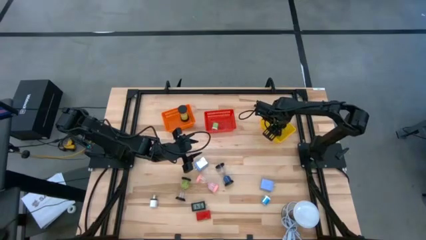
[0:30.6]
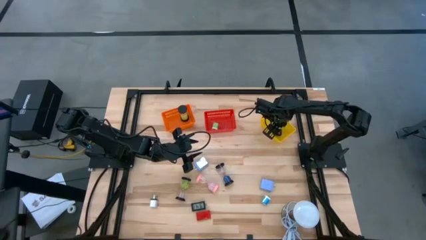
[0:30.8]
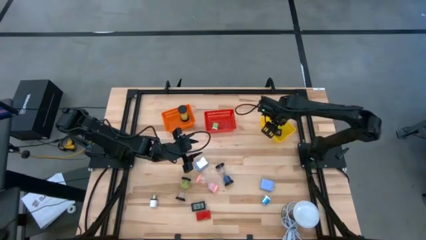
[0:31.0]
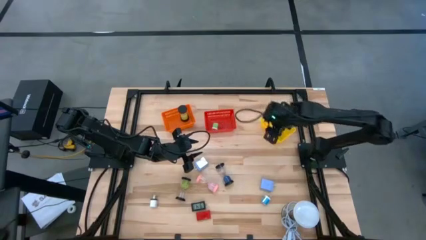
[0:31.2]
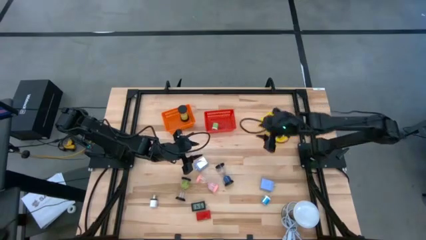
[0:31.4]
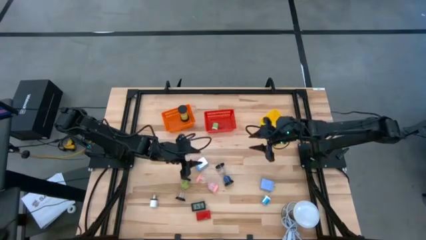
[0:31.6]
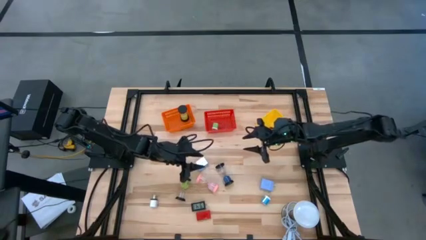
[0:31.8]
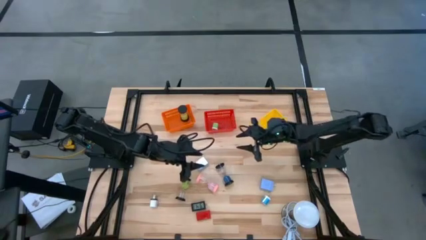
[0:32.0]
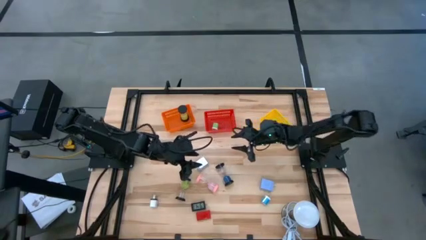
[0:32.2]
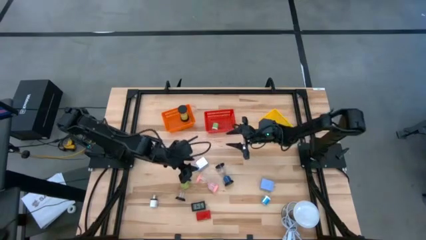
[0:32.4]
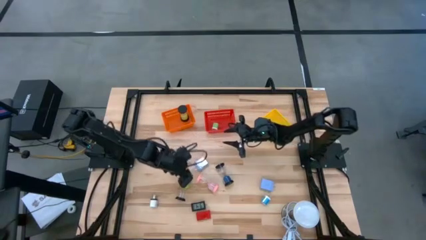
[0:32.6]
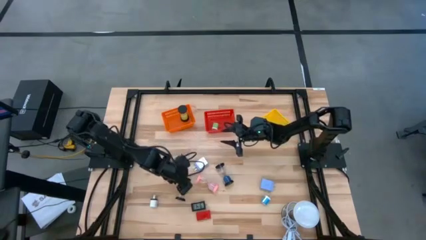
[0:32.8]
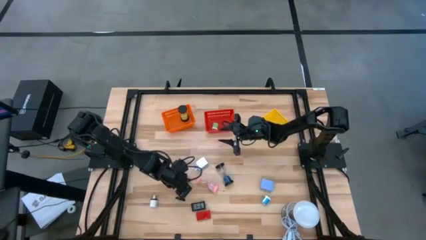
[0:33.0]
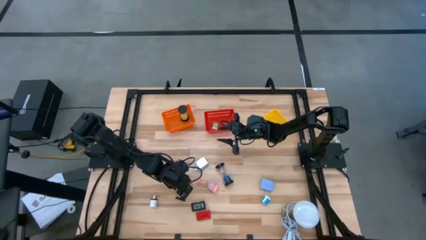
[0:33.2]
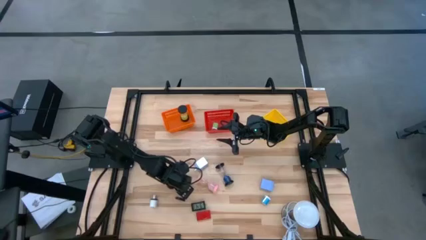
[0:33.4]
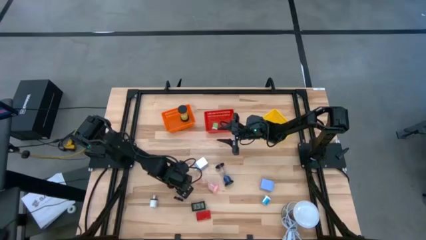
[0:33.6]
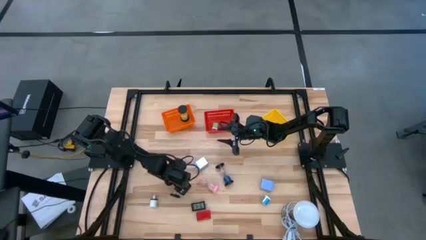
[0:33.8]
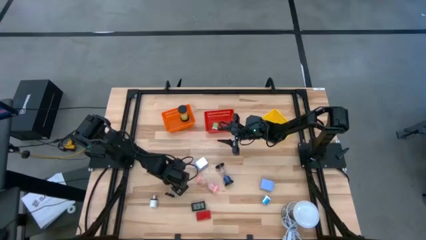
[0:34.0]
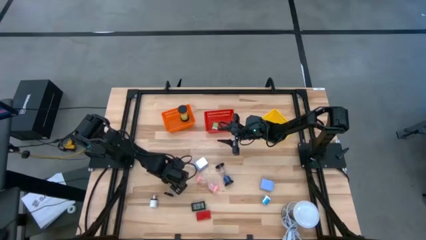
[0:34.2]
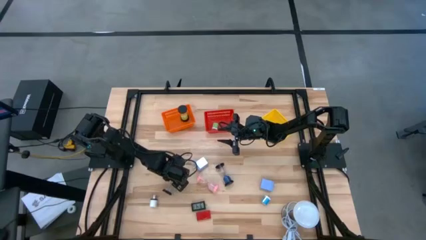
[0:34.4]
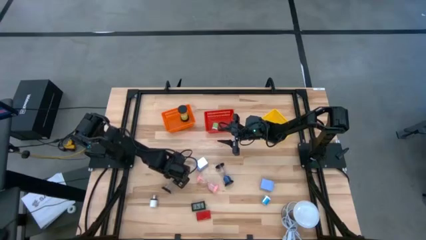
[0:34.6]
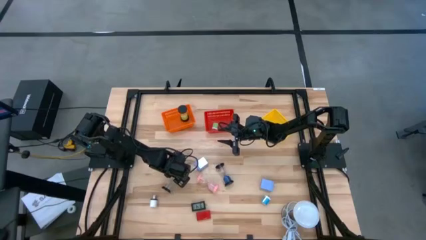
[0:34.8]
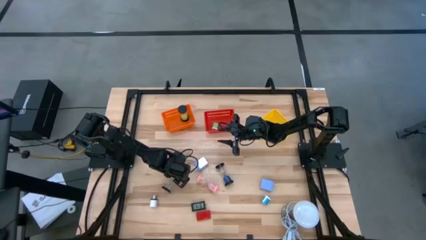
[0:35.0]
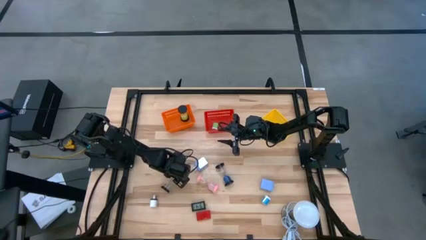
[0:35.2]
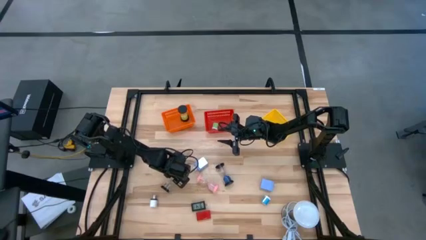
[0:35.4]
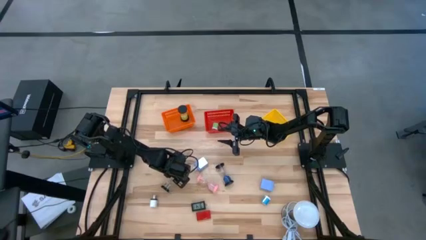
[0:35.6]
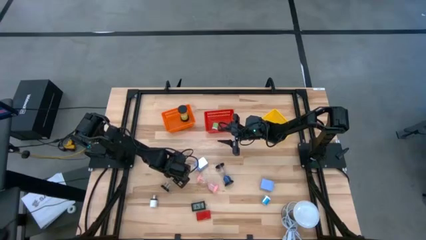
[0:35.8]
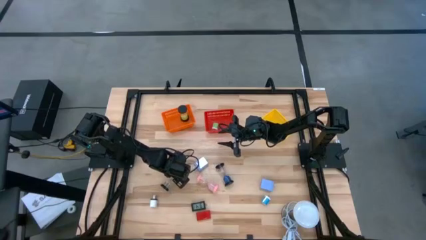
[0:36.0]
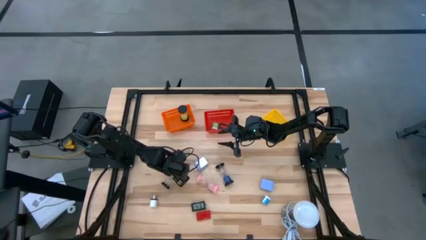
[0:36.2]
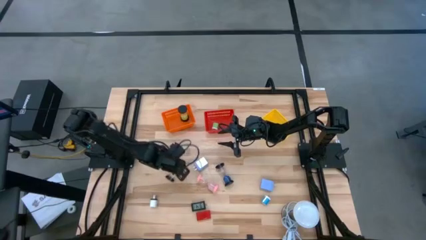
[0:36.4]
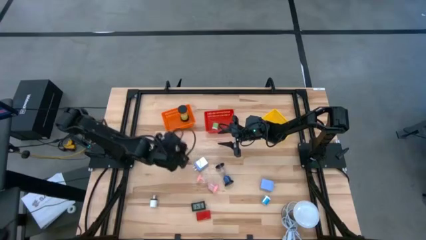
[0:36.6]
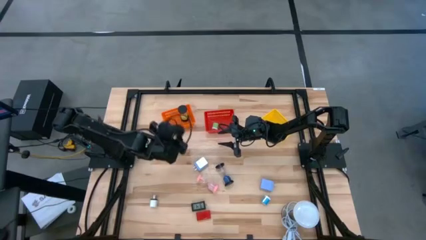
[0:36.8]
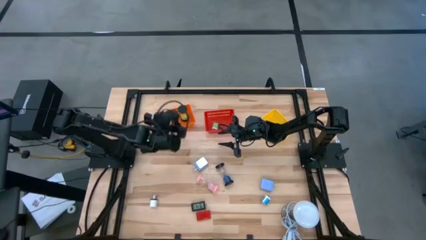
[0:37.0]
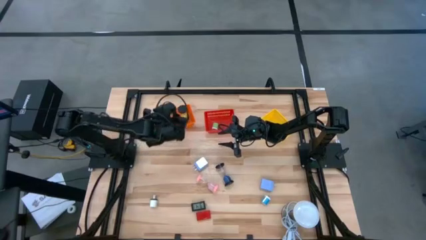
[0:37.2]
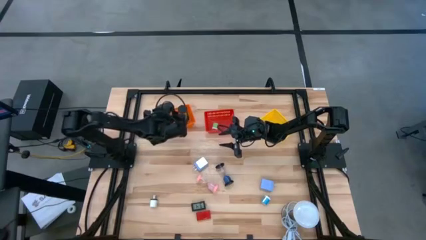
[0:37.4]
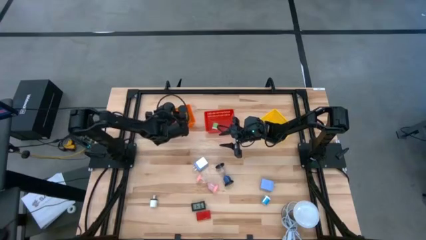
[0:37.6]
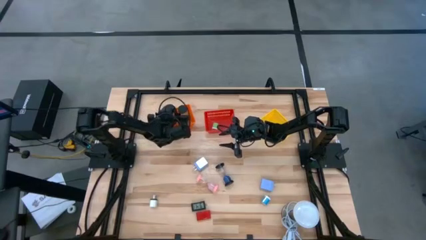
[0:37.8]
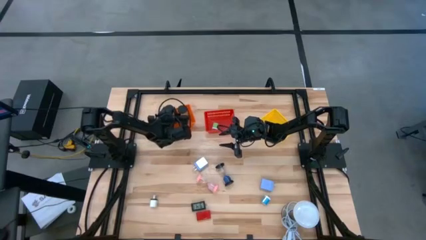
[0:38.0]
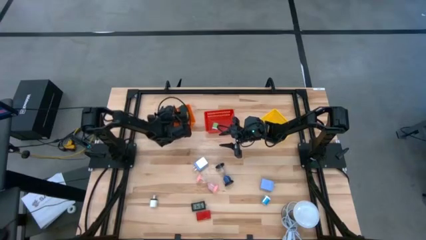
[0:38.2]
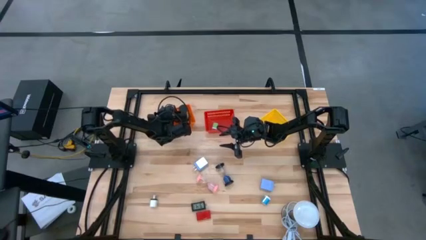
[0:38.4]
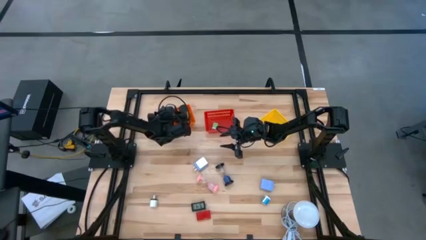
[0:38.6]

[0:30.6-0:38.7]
Task: Pick & Place Office items
Put the green hourglass into the orange bin

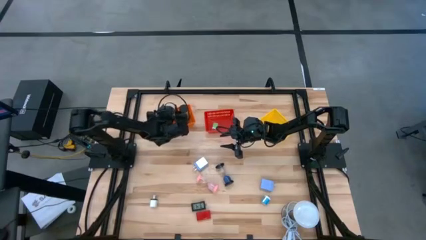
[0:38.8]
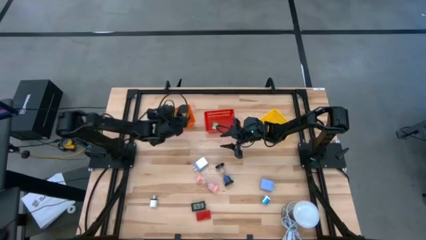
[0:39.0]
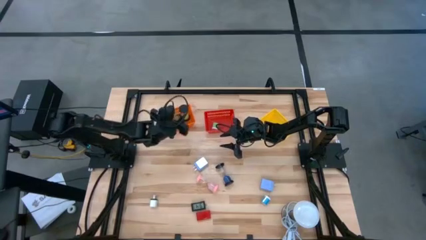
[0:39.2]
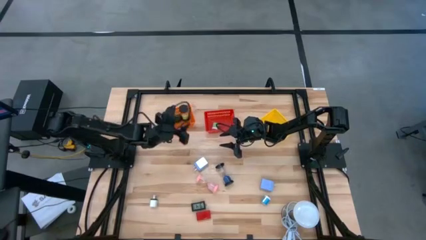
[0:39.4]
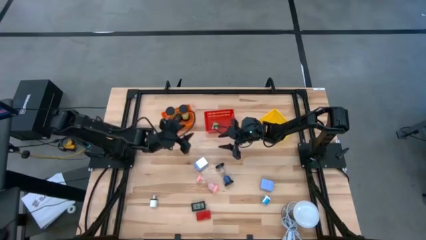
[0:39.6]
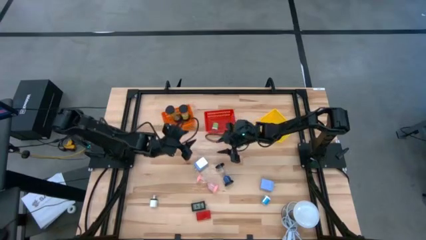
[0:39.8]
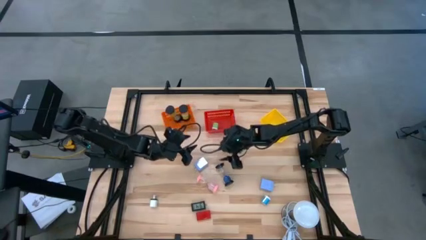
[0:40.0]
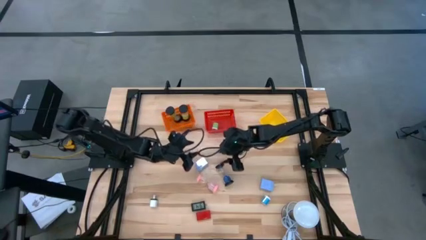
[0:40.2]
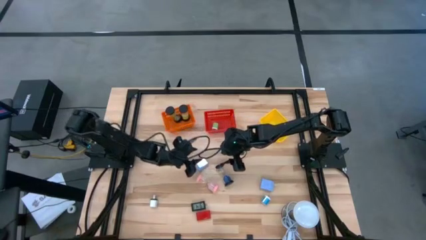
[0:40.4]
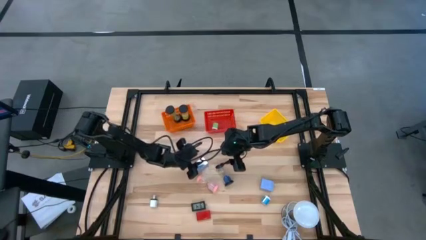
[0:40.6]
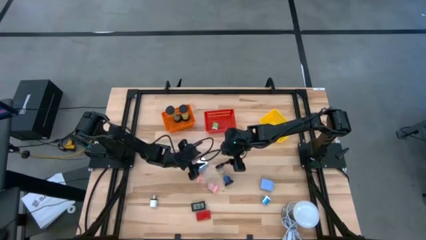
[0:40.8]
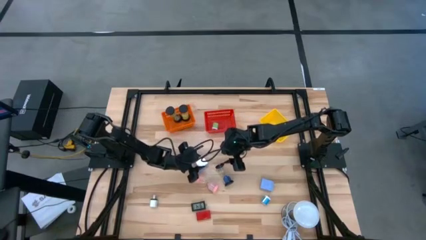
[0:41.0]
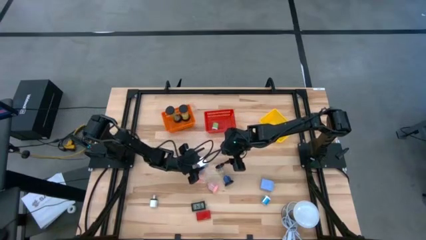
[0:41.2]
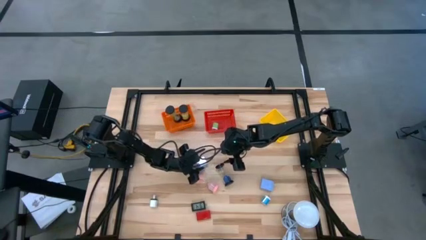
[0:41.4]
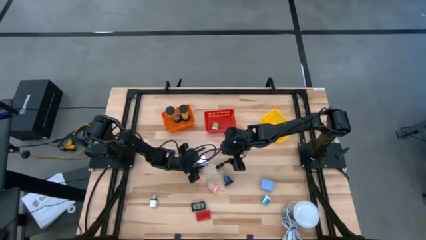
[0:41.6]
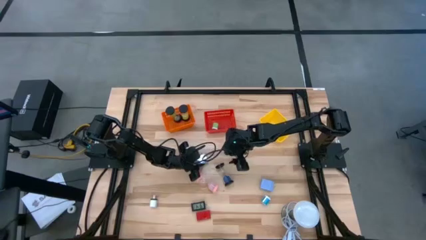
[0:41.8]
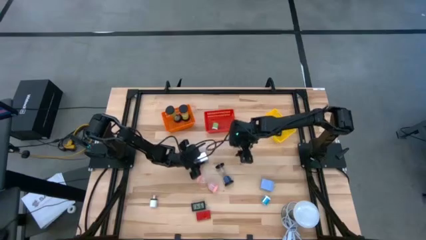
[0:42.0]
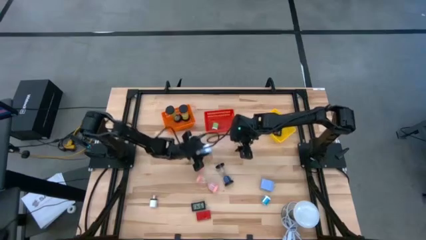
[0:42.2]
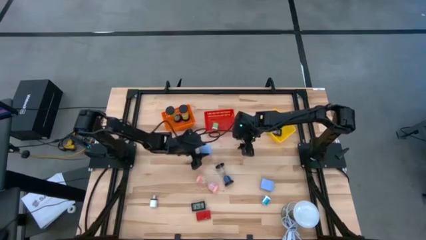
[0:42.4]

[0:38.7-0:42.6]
Put the left light violet charger adapter into the red bin

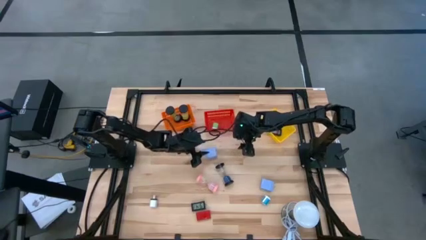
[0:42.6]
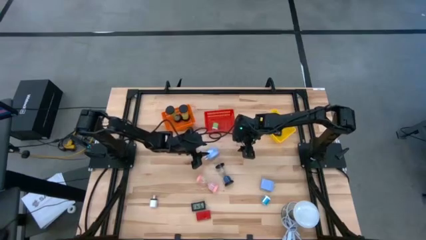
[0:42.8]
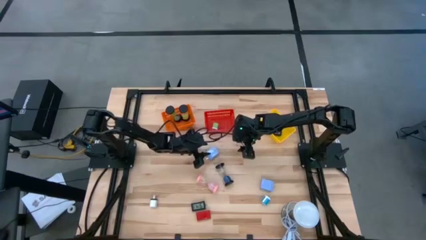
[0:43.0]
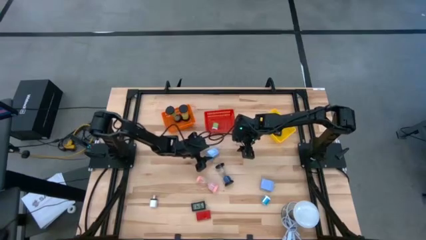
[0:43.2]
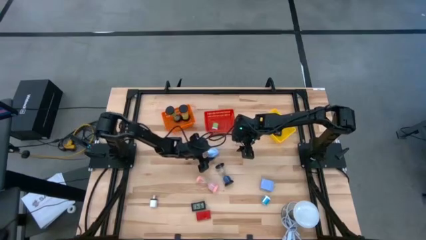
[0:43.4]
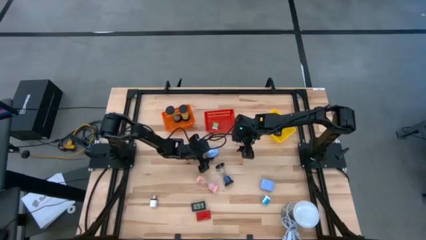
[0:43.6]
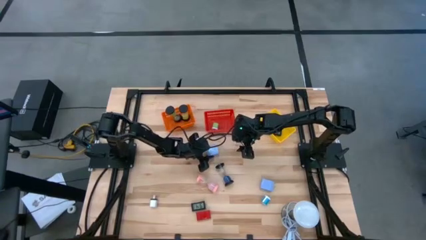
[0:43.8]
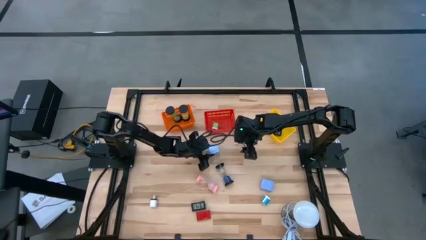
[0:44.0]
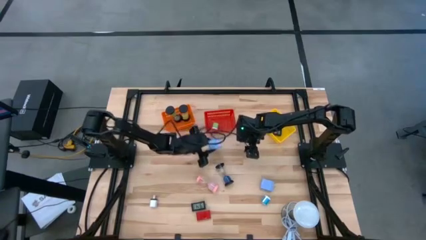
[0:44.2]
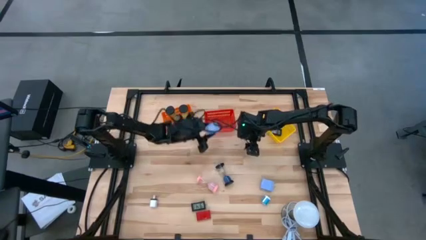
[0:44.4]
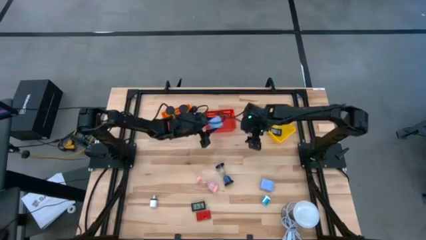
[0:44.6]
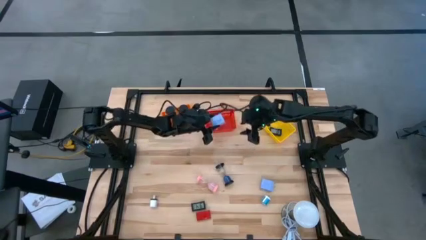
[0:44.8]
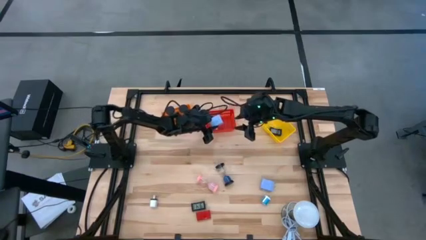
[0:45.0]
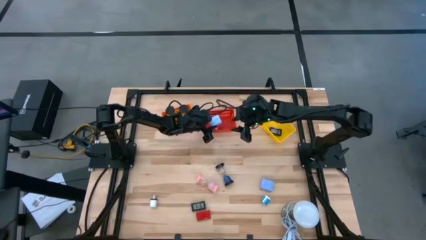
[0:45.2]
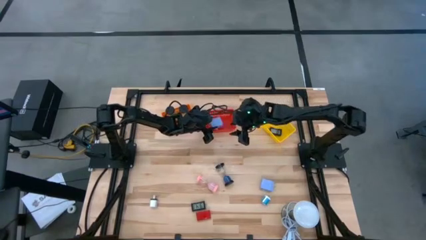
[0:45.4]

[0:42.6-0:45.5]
Put the left light violet charger adapter into the red bin

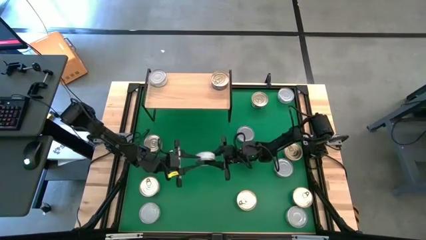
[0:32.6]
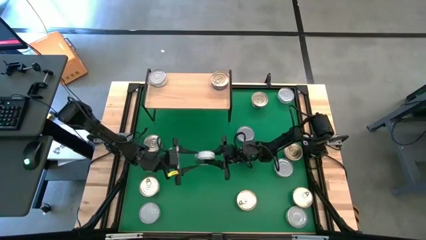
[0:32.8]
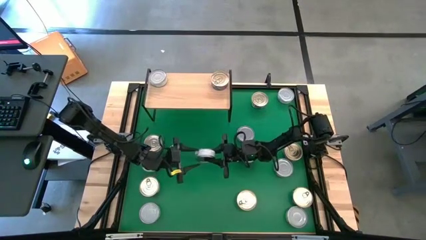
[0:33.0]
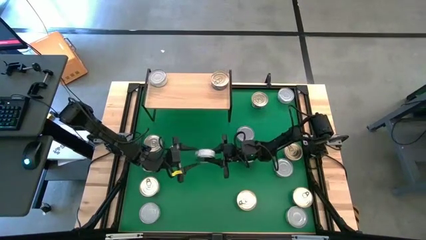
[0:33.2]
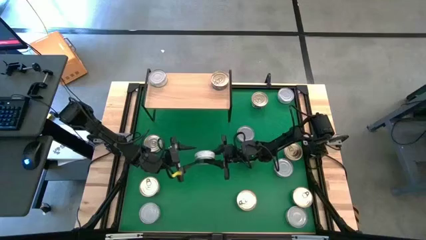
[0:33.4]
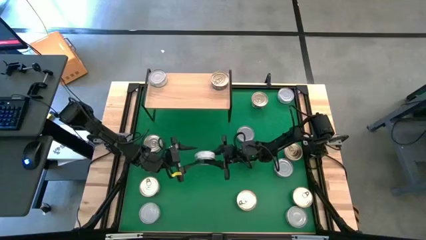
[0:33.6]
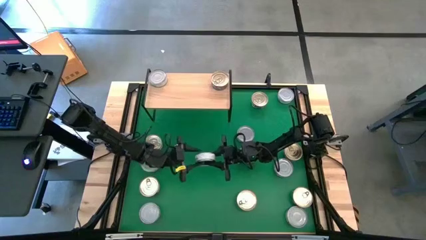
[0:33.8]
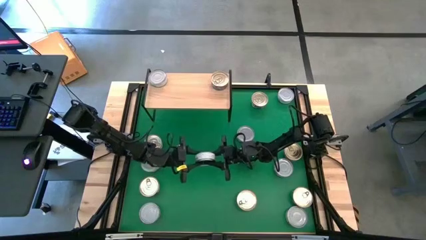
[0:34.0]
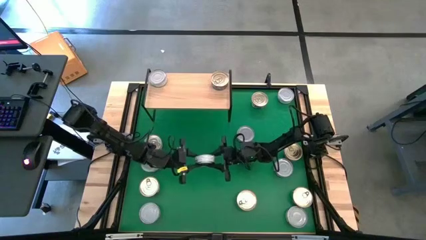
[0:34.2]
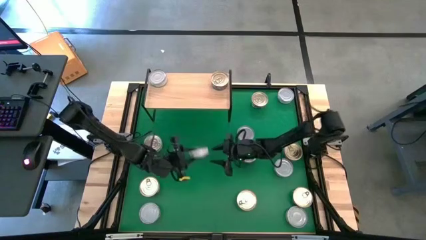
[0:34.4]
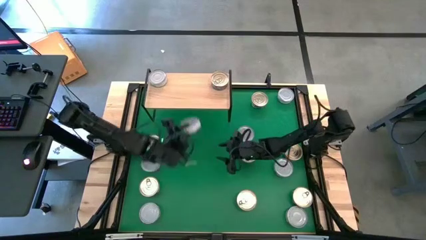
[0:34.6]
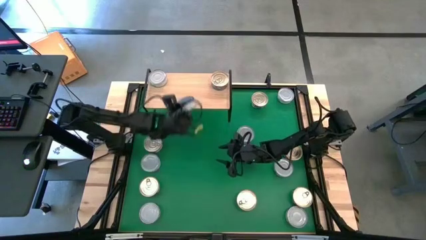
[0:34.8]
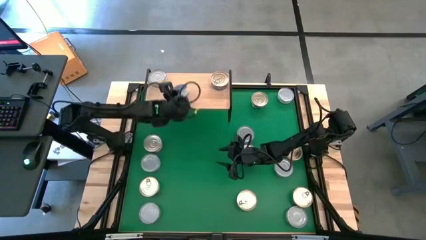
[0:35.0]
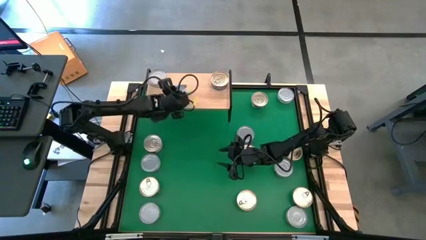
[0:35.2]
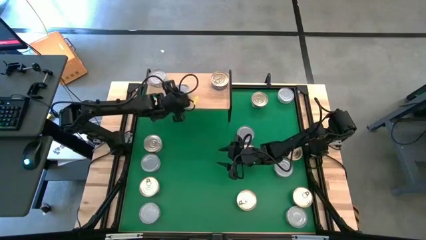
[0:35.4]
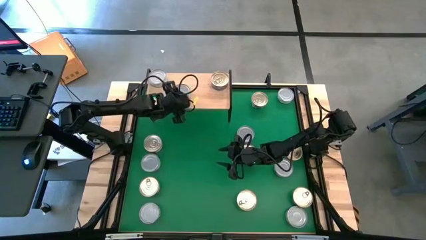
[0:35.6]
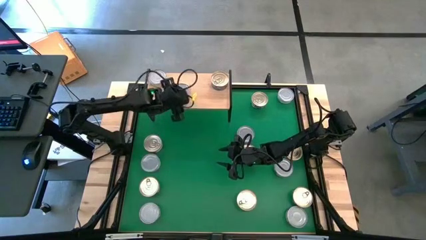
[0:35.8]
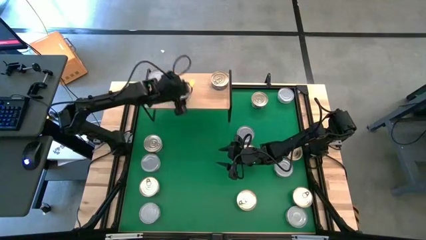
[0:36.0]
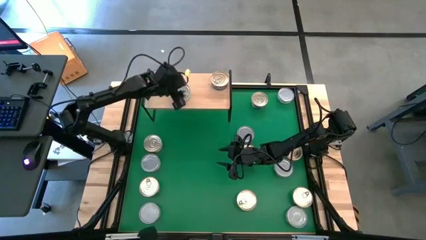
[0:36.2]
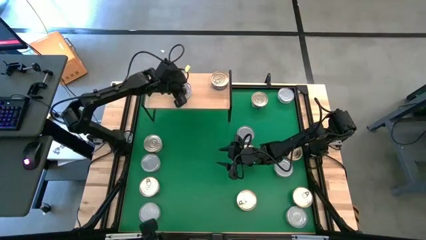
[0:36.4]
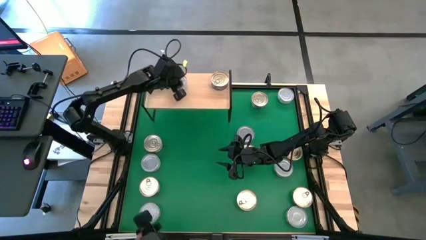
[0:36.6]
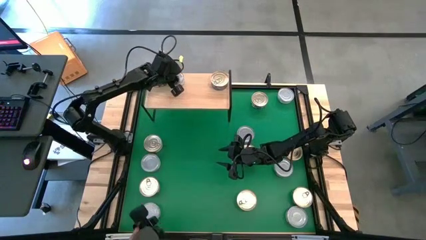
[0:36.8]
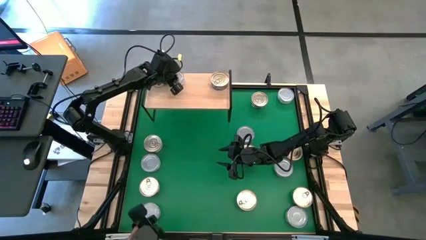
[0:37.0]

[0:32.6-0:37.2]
Task: Stack canned seafood by type on shelf
Put the green tuna can on the shelf
